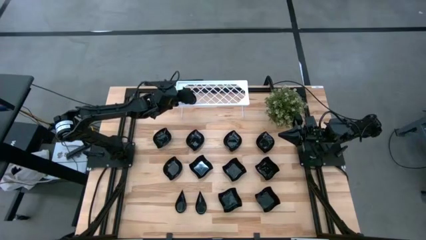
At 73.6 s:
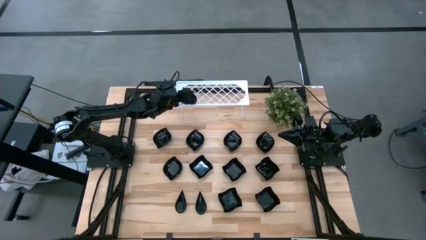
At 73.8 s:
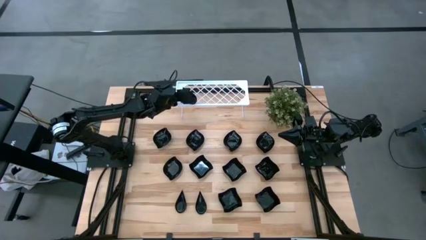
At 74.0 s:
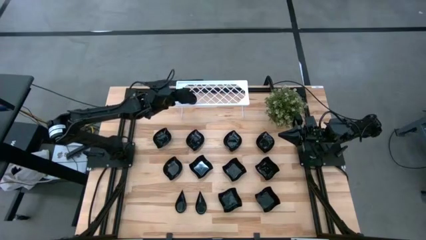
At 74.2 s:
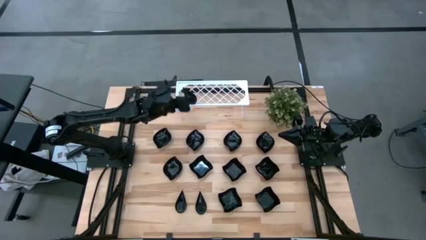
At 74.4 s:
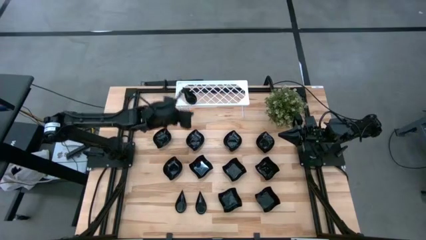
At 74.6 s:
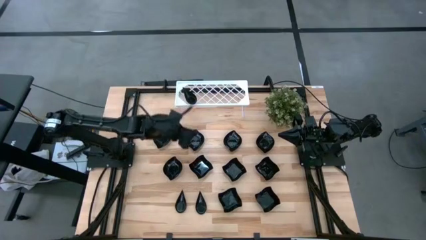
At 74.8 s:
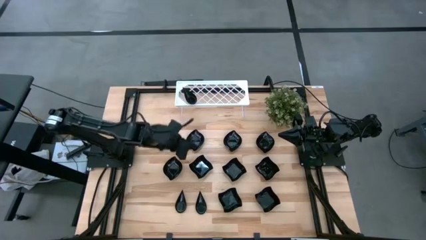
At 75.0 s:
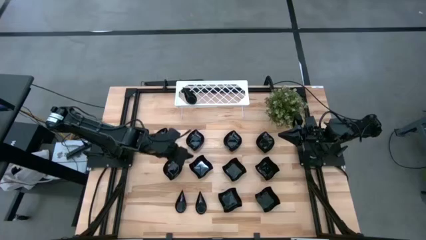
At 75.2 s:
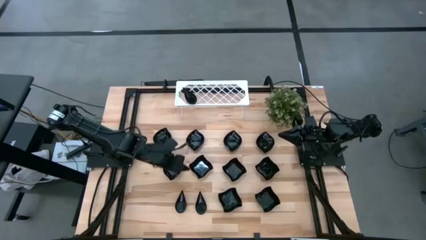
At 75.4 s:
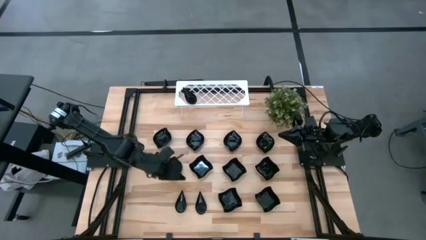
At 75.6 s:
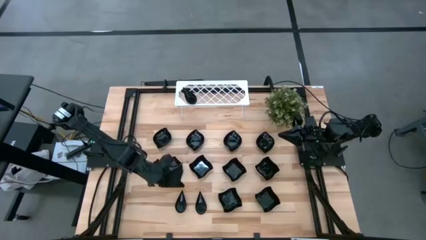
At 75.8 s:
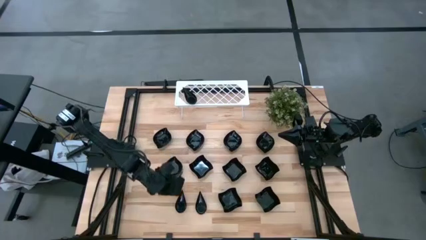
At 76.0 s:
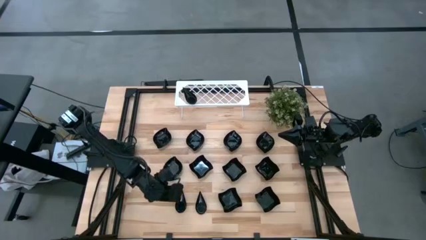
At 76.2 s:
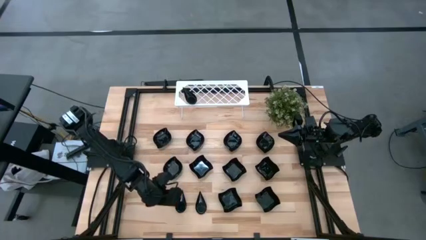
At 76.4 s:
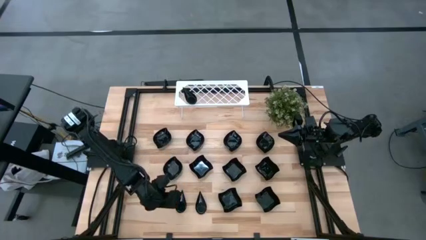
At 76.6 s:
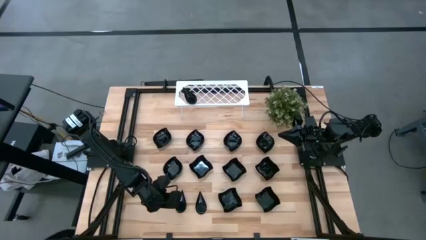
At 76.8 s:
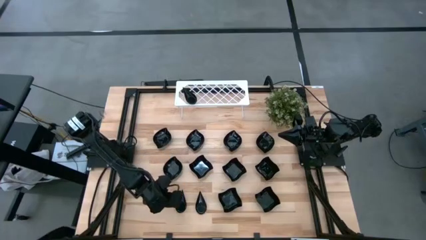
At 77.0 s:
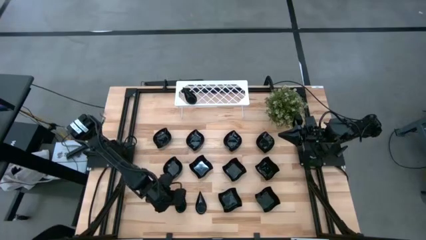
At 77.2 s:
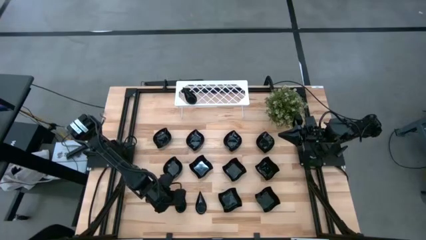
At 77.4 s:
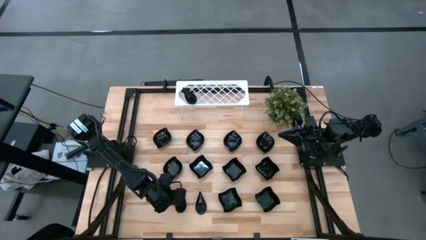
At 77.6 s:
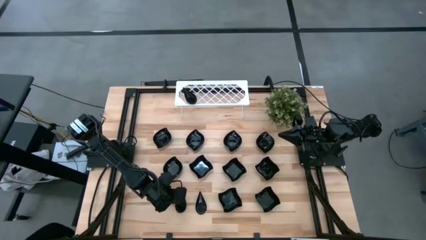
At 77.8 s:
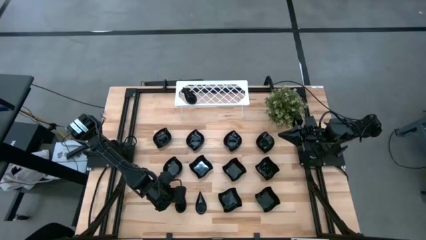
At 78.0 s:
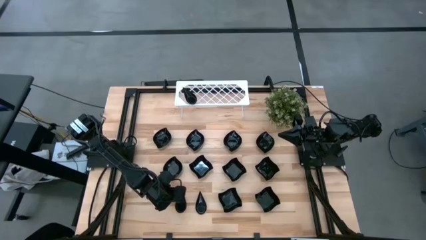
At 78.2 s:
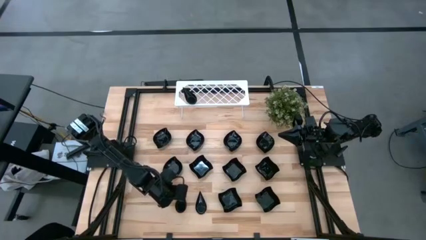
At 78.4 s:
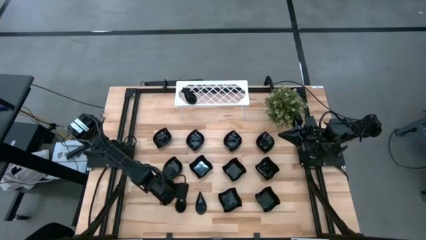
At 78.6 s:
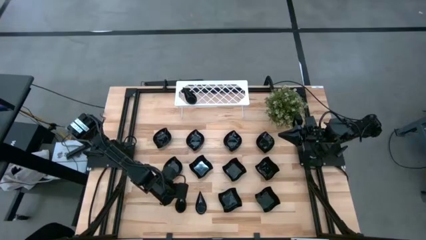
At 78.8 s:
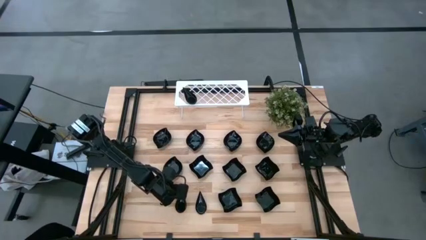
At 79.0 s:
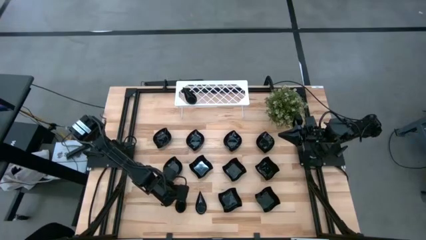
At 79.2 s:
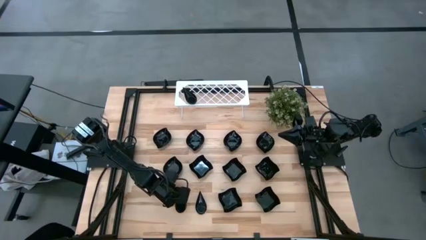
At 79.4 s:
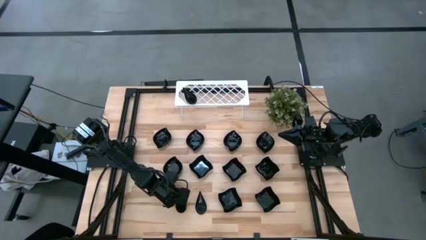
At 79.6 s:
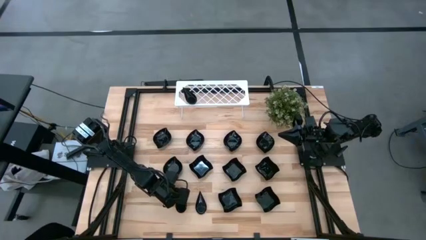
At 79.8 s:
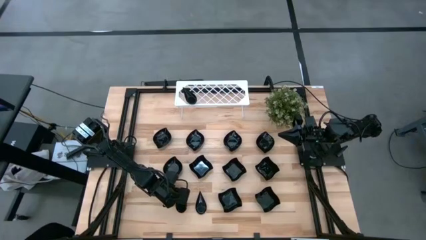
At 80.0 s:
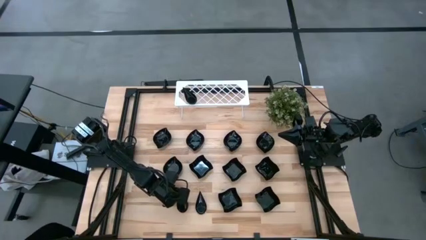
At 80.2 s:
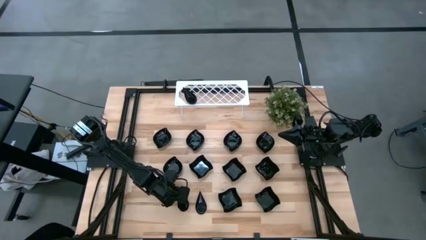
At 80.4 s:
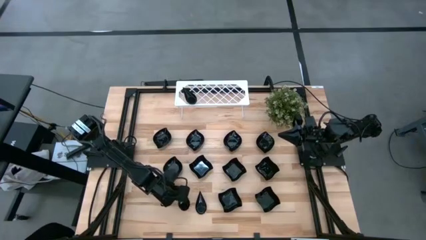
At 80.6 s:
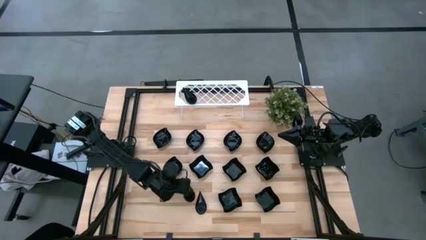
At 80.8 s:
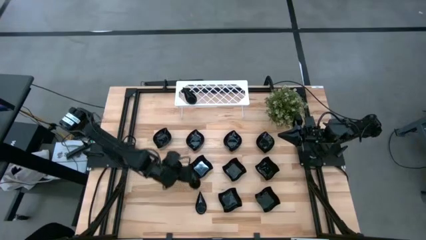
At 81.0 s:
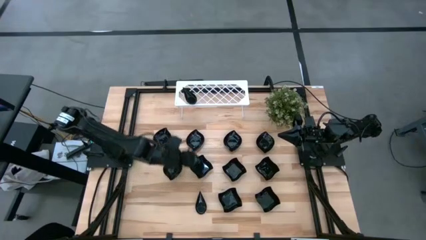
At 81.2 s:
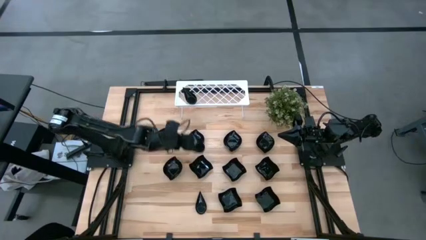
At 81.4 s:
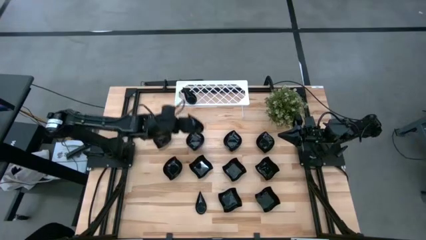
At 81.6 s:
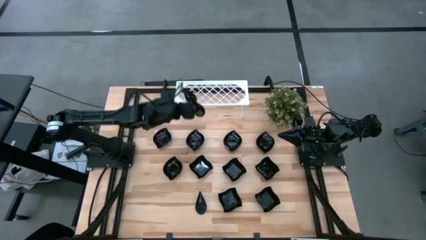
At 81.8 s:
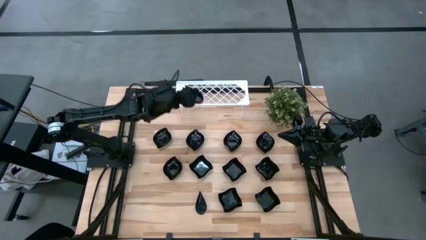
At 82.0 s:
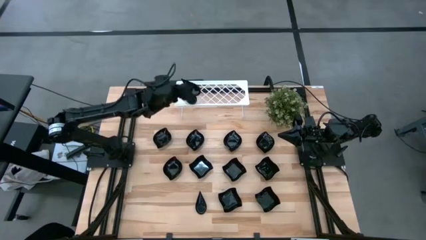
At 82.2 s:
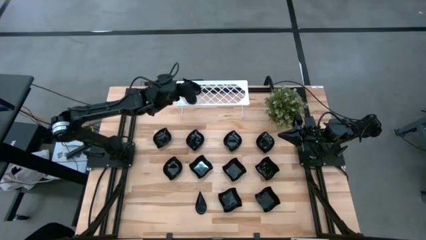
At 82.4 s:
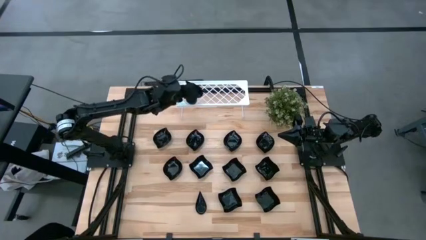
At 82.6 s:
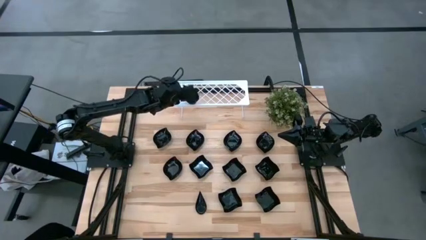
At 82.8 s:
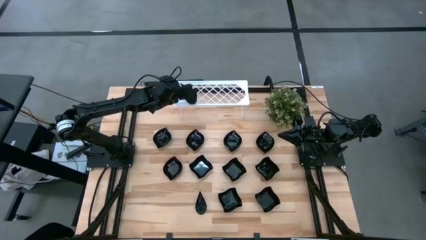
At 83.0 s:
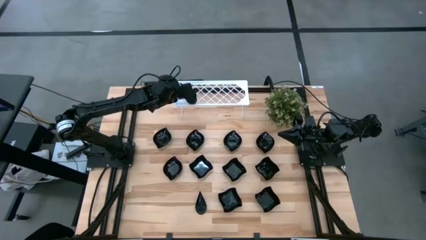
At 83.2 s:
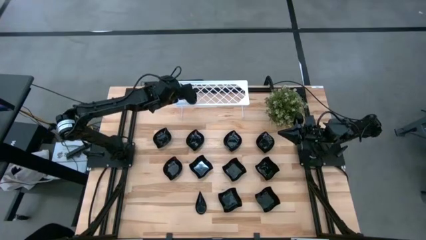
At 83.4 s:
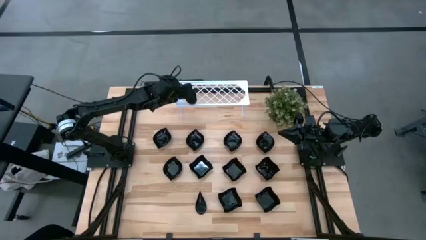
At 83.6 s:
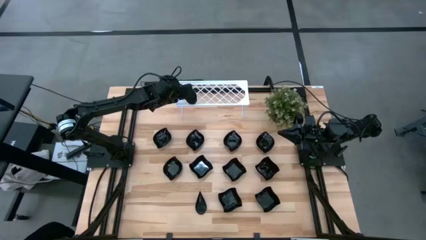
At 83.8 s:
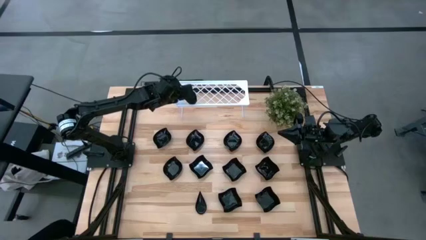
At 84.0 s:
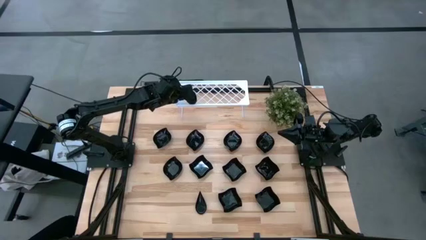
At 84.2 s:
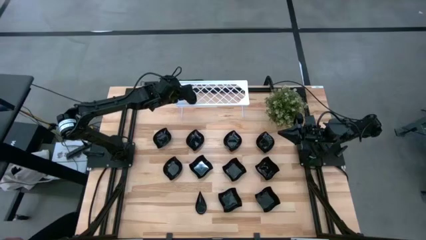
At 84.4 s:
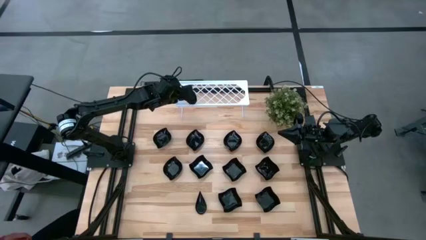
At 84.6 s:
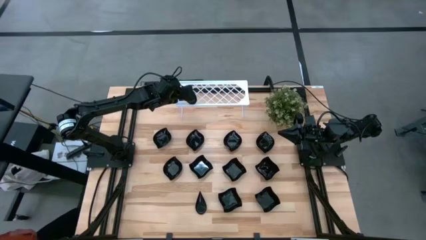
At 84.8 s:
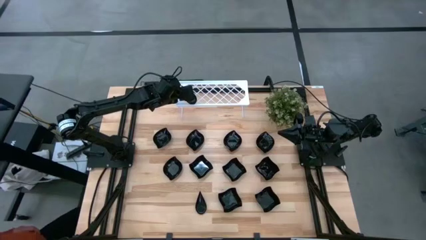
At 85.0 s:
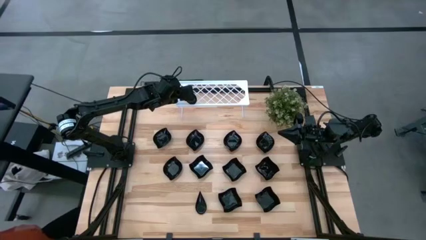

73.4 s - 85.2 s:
Task: Pick & Place Mini shaped plates
Stack the left black drop shaped plate on top of the black drop shaped plates on the shelf

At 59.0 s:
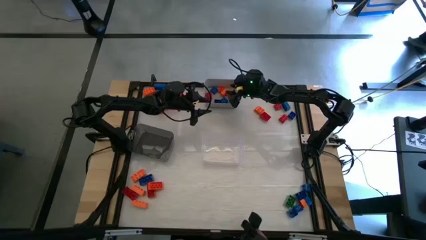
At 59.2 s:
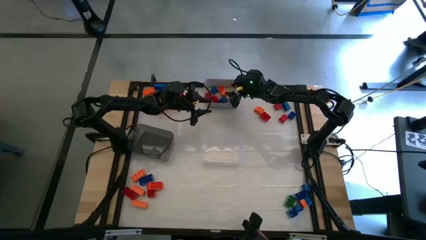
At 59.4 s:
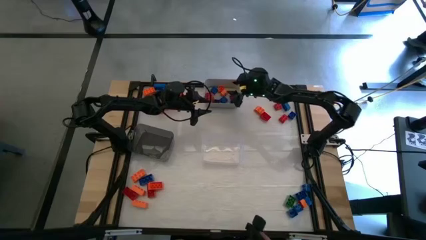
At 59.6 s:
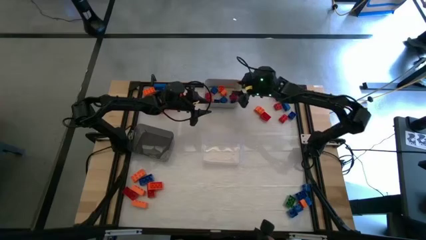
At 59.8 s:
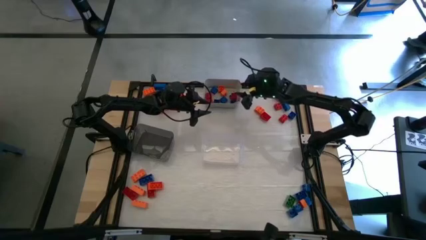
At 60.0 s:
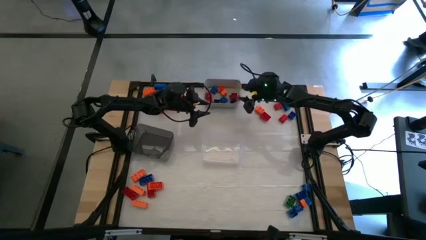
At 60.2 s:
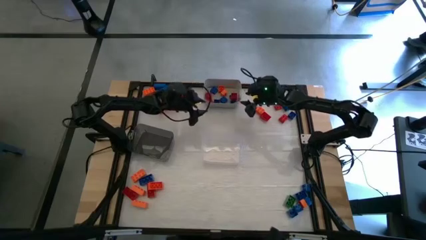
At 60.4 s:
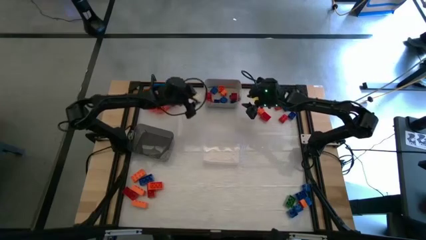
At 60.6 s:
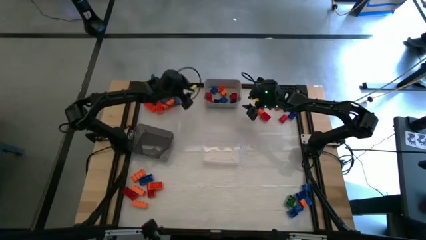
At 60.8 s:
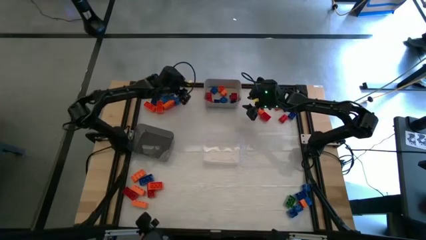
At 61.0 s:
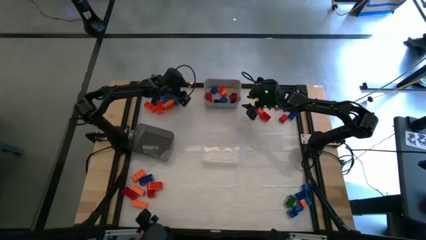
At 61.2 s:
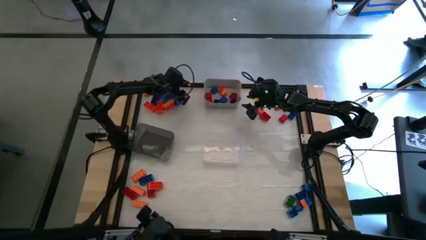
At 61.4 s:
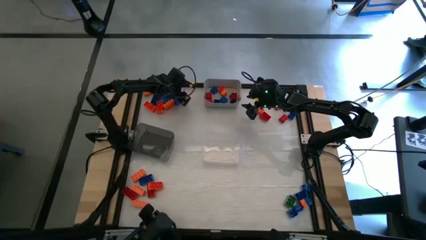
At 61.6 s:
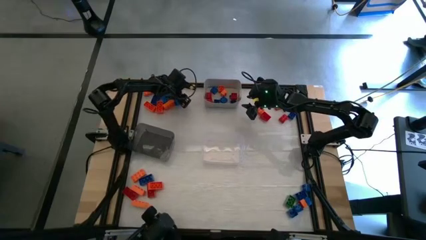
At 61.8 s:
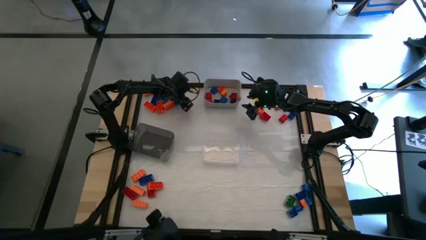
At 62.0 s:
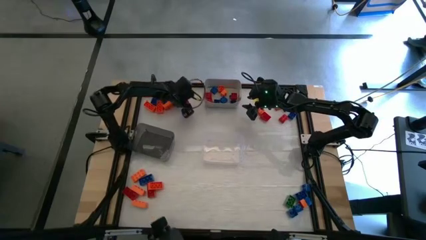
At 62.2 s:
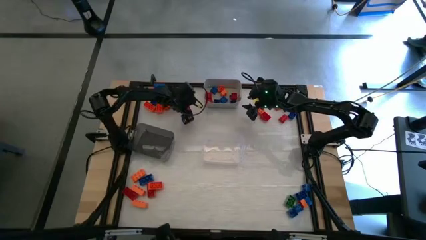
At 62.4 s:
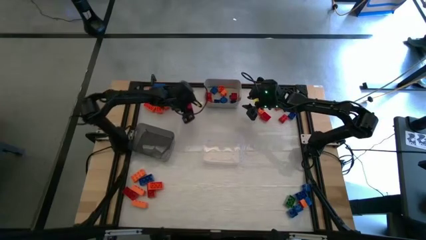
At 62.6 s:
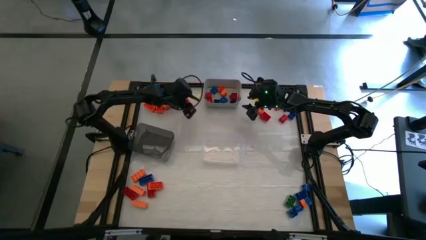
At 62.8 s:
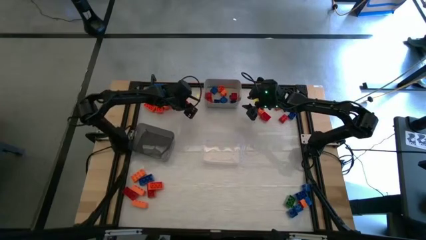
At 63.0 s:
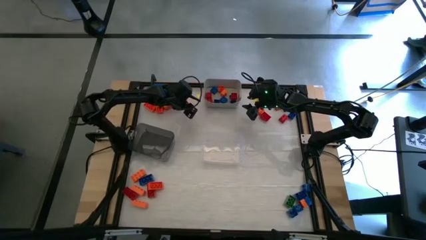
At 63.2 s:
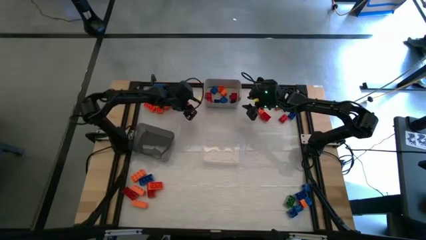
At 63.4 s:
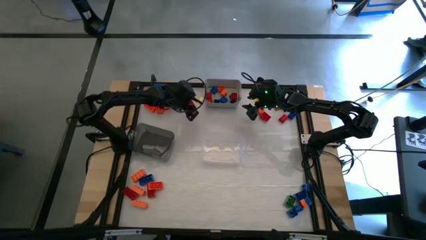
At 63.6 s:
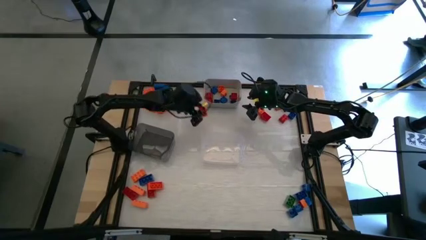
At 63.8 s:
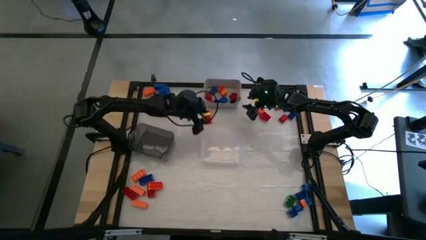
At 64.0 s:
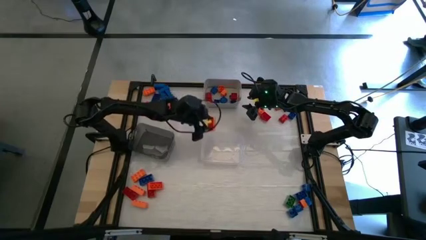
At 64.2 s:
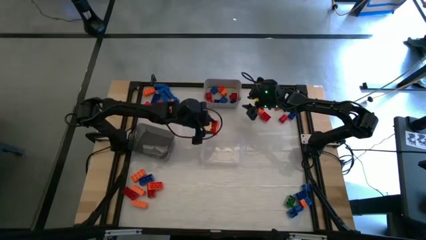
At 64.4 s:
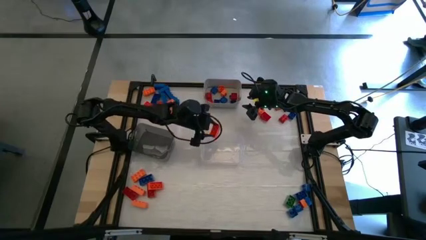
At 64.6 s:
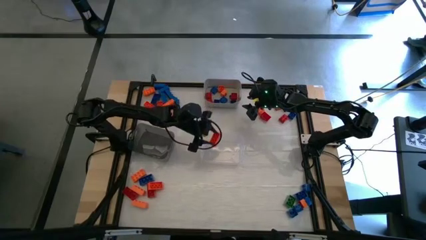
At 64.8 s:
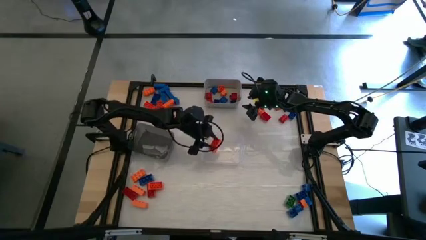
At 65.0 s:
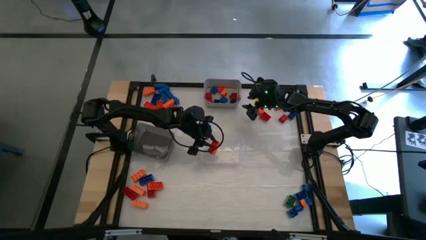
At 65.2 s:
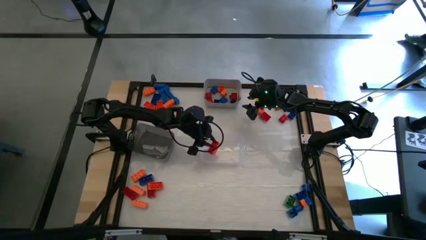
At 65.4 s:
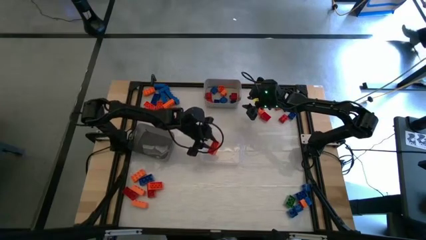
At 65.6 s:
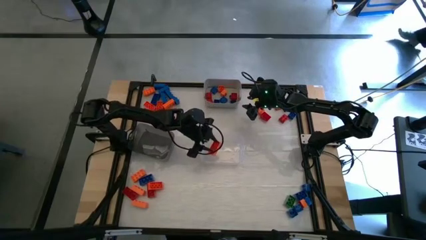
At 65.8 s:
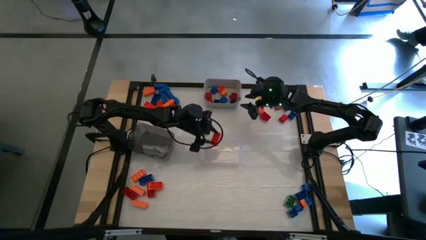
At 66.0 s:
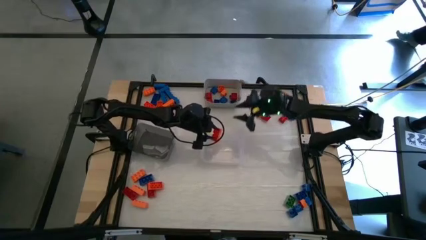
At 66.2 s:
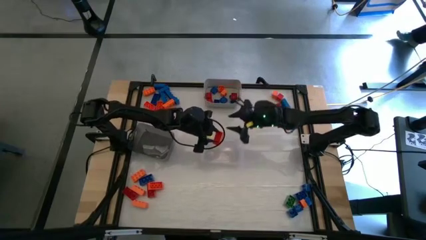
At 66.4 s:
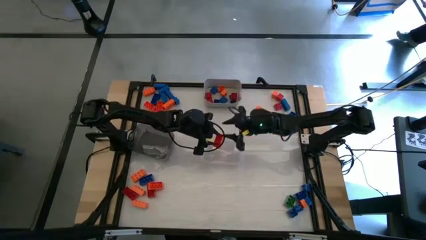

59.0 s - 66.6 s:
Task: Sort blocks by size
Put the big orange game piece into the transparent bin
